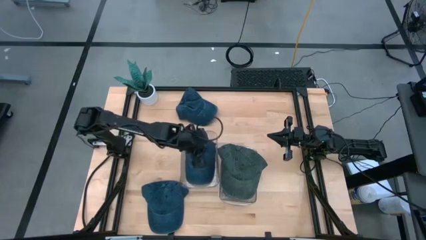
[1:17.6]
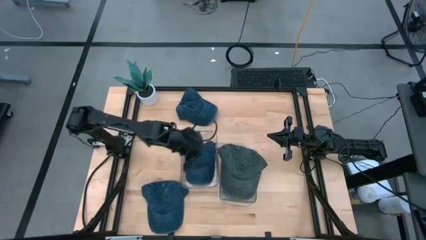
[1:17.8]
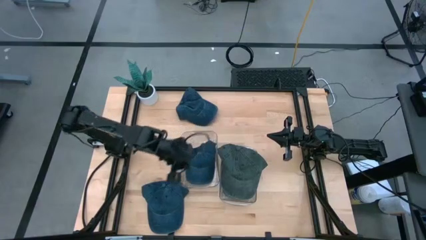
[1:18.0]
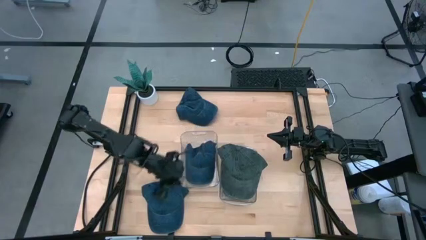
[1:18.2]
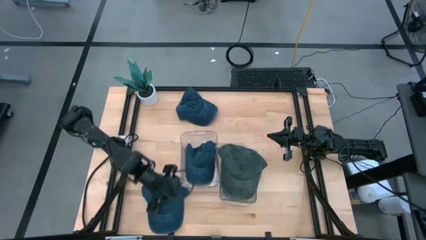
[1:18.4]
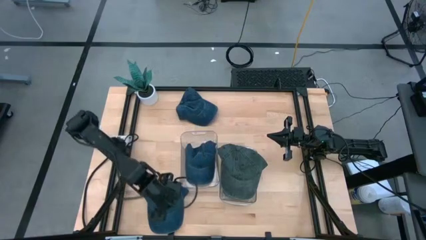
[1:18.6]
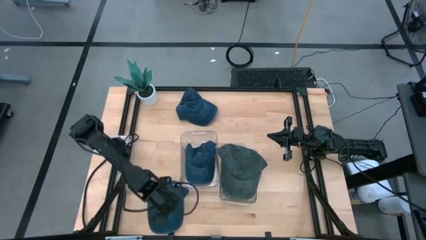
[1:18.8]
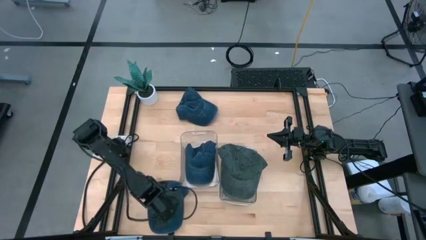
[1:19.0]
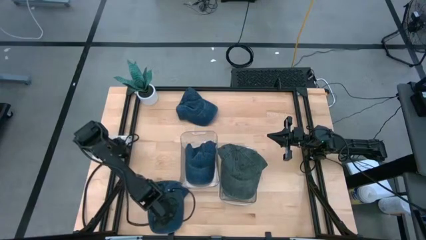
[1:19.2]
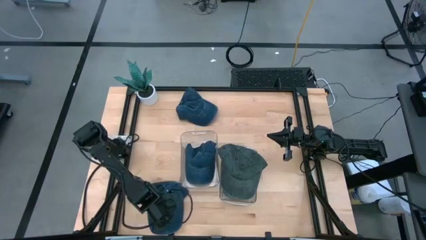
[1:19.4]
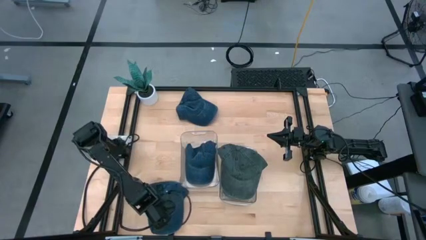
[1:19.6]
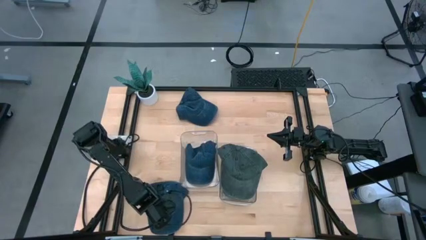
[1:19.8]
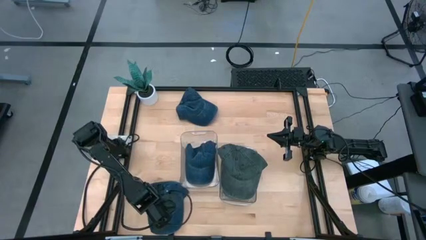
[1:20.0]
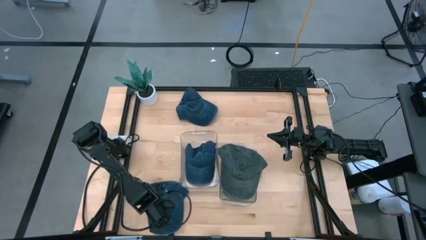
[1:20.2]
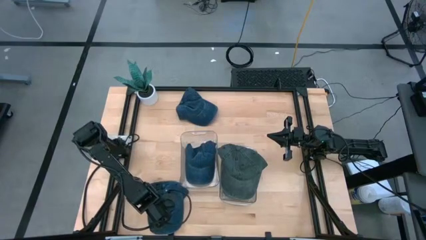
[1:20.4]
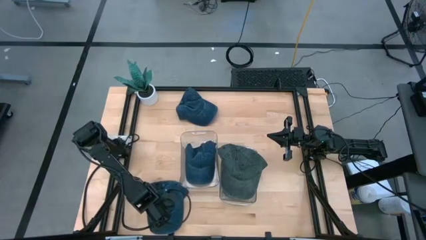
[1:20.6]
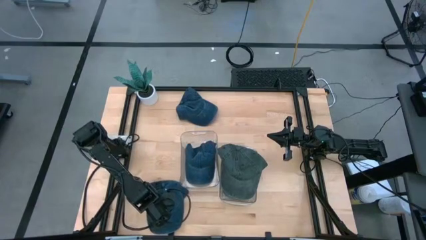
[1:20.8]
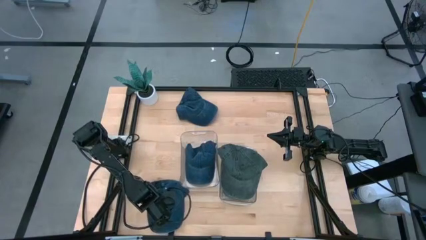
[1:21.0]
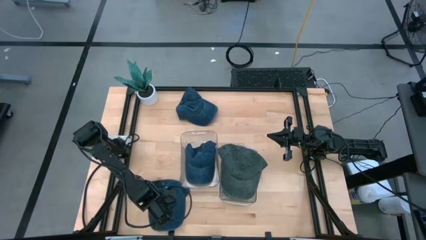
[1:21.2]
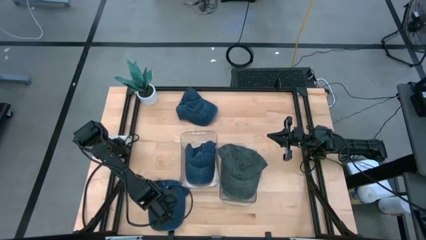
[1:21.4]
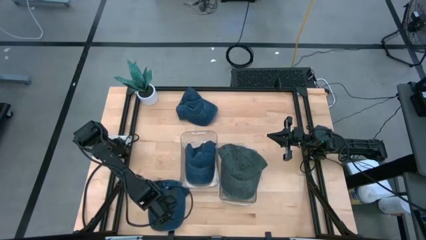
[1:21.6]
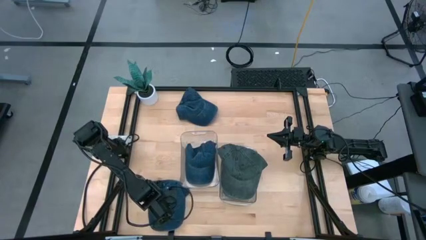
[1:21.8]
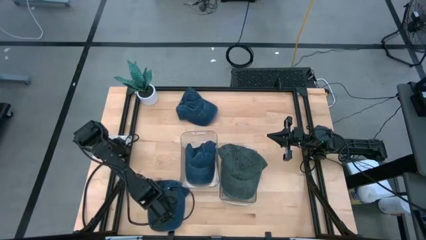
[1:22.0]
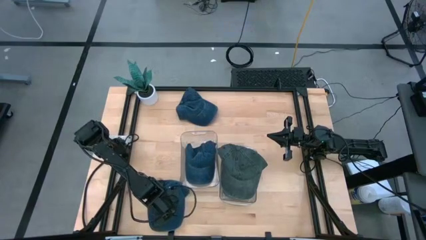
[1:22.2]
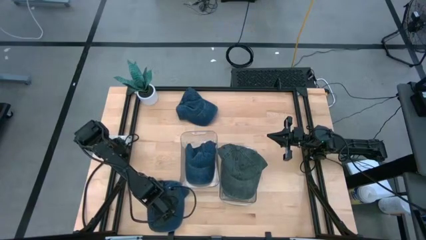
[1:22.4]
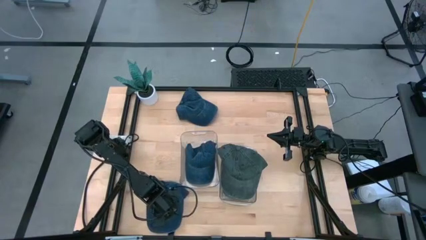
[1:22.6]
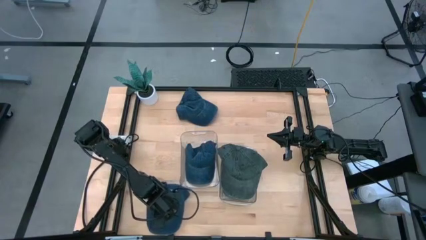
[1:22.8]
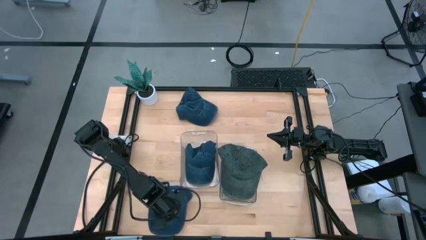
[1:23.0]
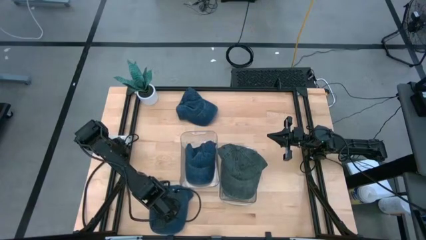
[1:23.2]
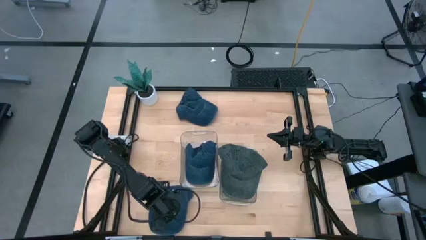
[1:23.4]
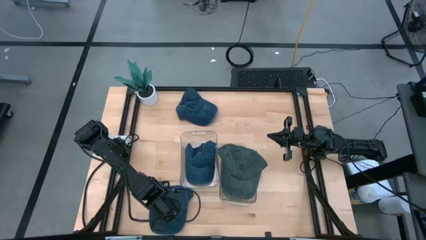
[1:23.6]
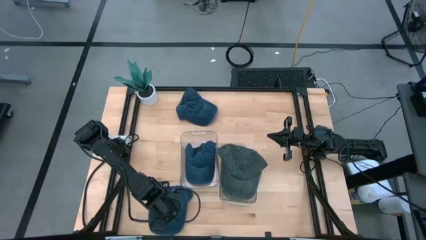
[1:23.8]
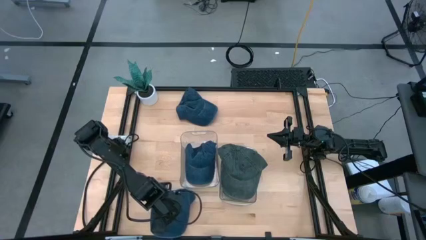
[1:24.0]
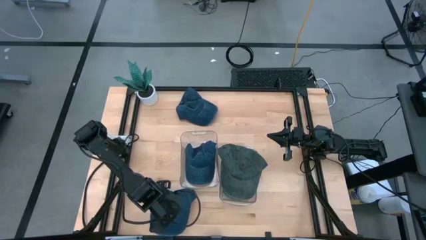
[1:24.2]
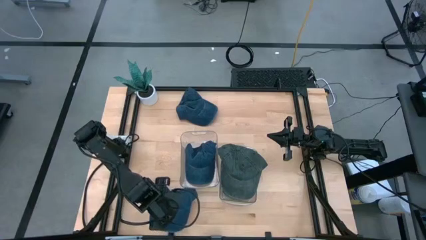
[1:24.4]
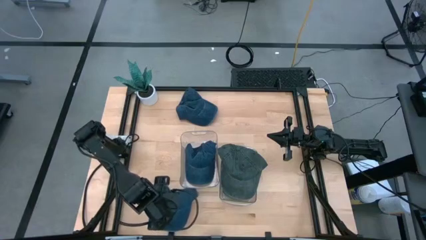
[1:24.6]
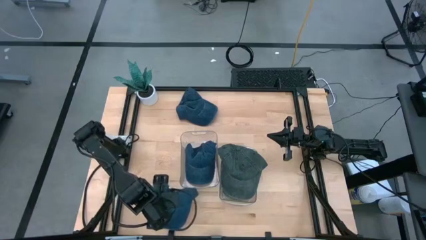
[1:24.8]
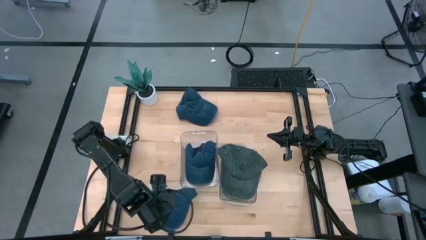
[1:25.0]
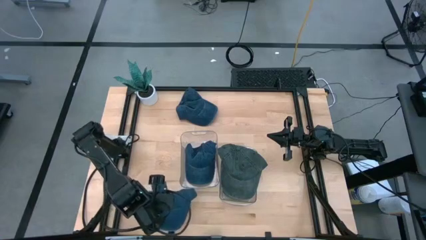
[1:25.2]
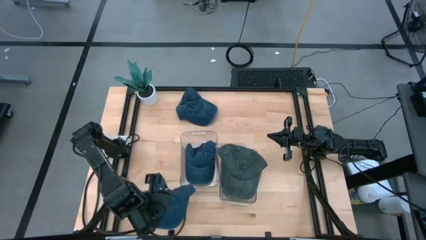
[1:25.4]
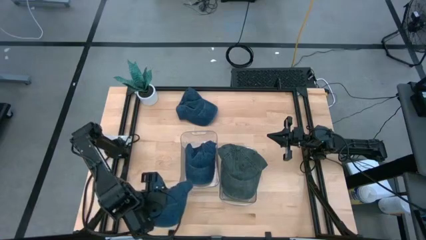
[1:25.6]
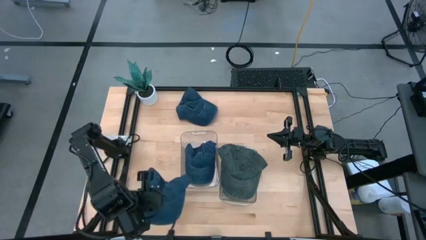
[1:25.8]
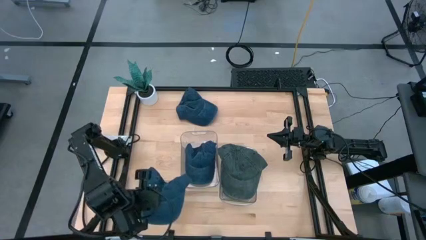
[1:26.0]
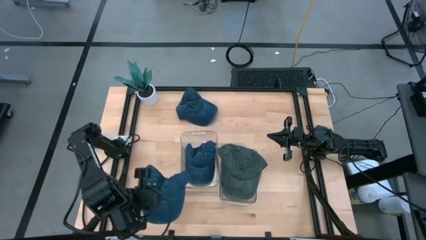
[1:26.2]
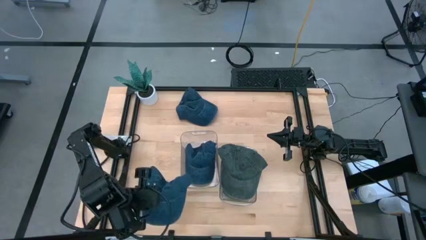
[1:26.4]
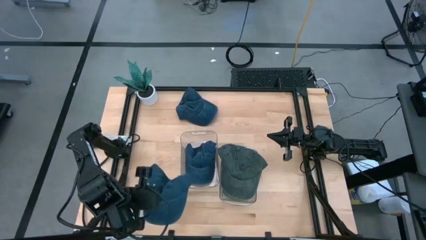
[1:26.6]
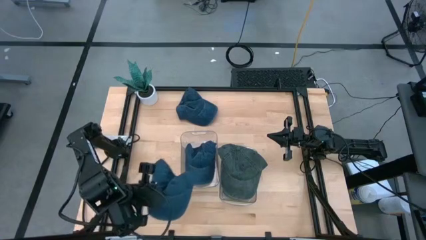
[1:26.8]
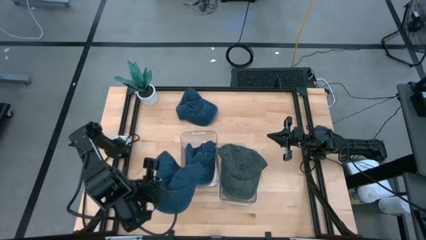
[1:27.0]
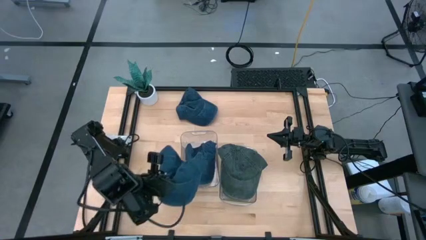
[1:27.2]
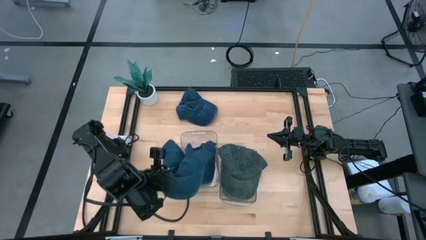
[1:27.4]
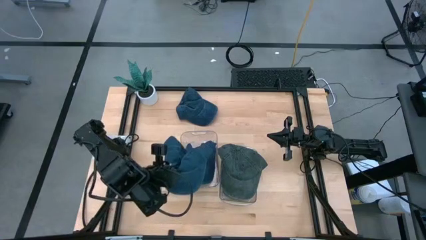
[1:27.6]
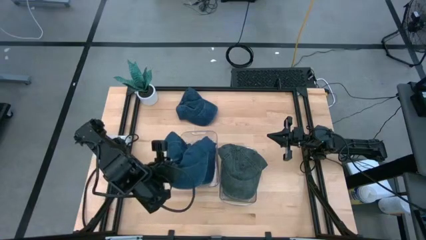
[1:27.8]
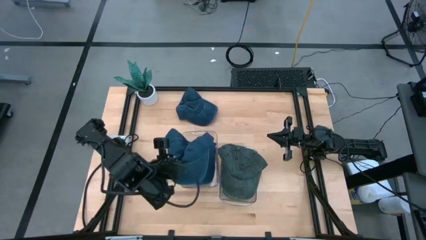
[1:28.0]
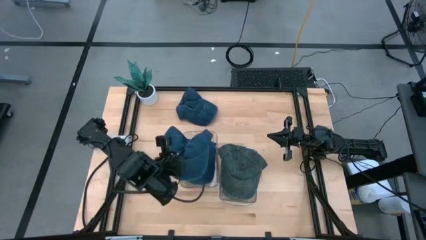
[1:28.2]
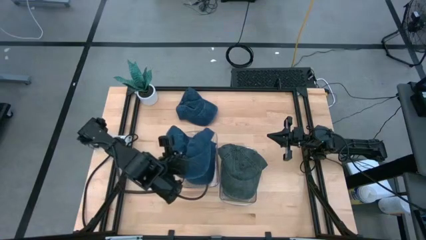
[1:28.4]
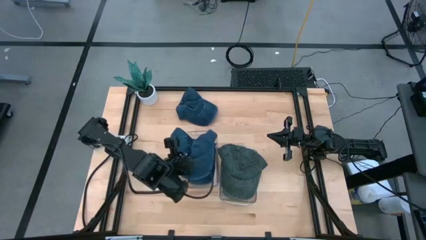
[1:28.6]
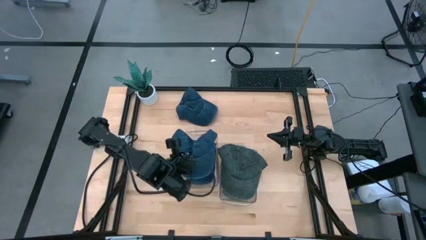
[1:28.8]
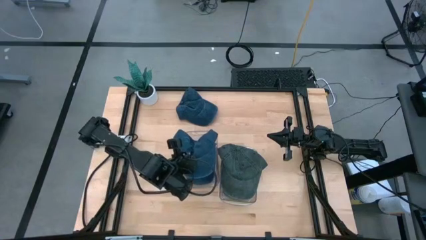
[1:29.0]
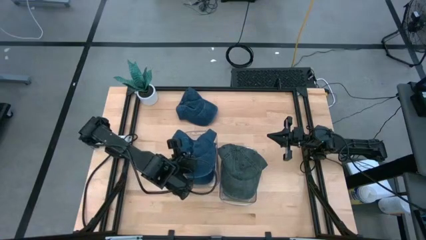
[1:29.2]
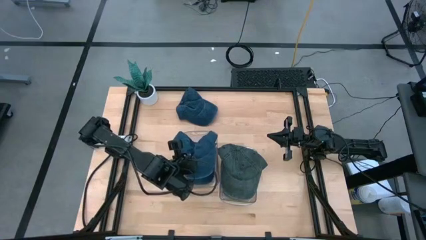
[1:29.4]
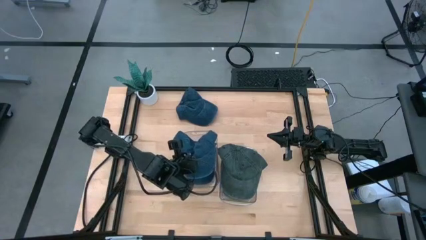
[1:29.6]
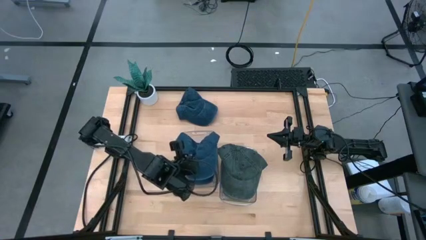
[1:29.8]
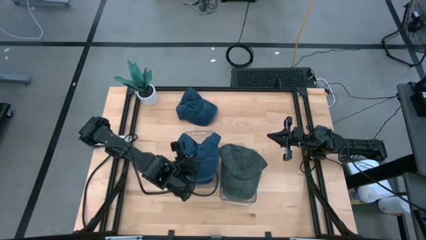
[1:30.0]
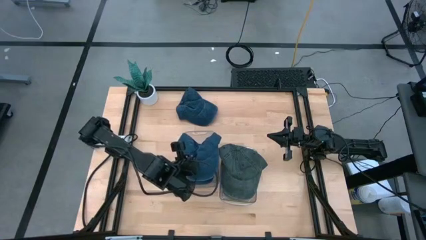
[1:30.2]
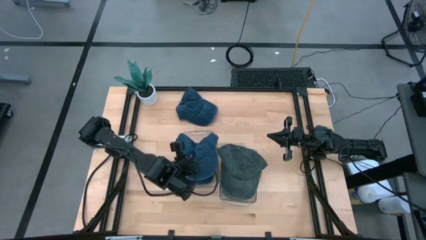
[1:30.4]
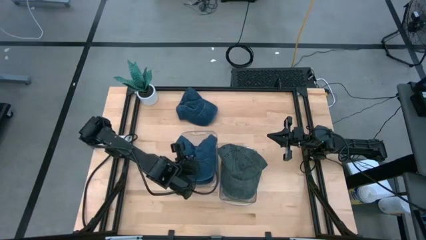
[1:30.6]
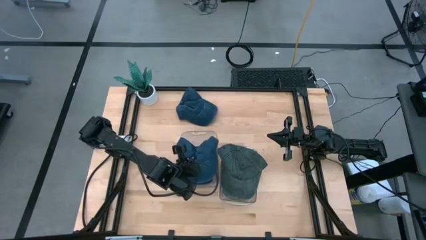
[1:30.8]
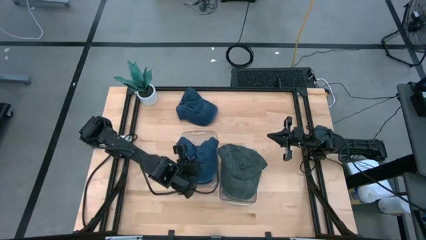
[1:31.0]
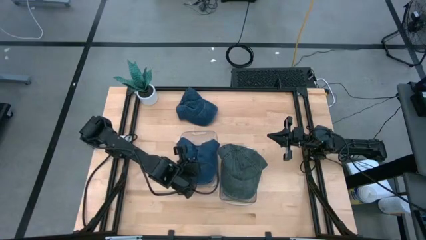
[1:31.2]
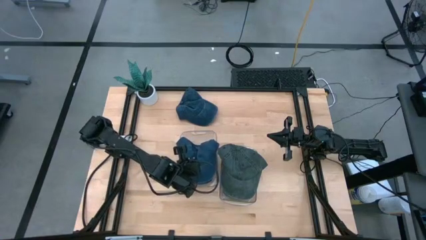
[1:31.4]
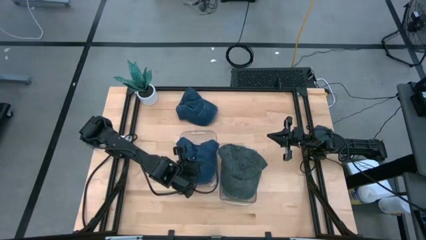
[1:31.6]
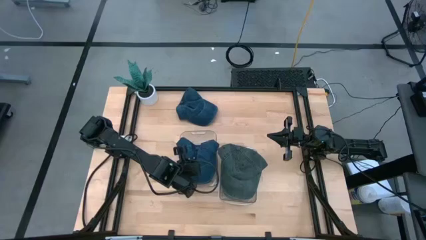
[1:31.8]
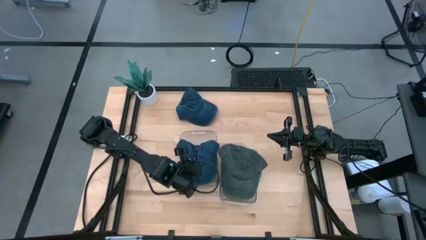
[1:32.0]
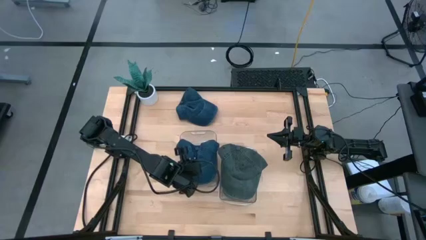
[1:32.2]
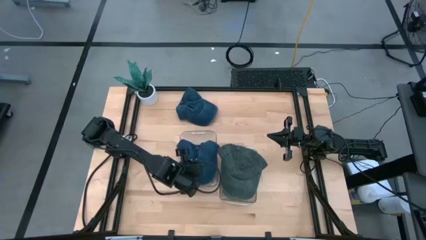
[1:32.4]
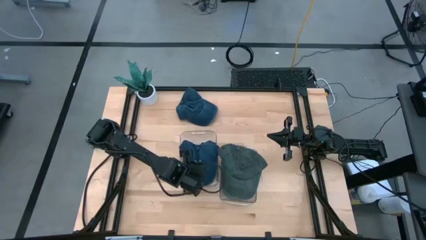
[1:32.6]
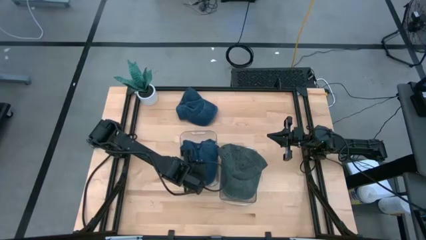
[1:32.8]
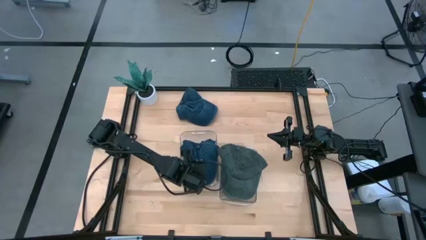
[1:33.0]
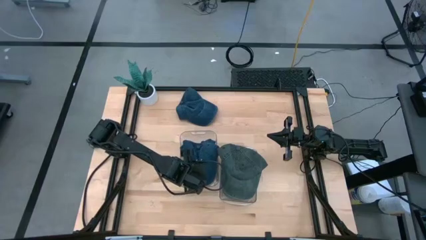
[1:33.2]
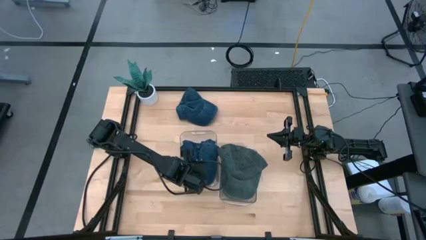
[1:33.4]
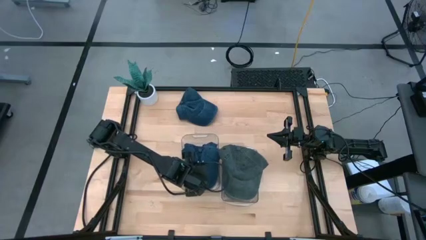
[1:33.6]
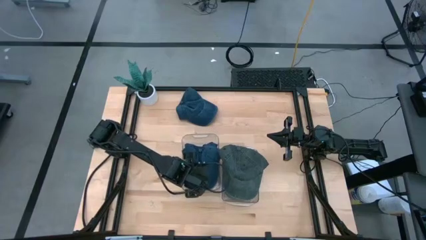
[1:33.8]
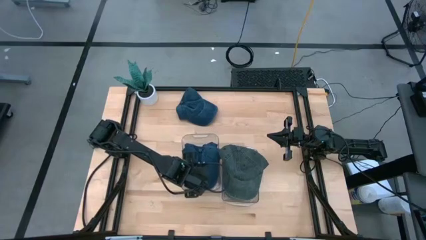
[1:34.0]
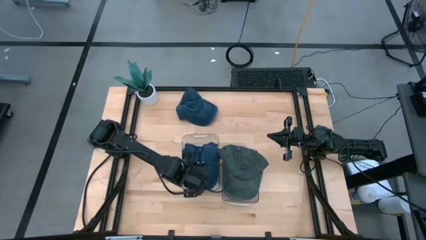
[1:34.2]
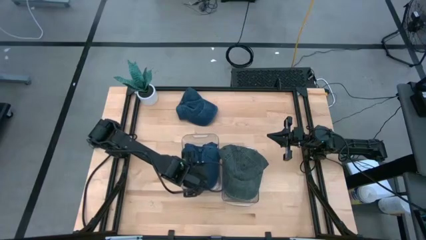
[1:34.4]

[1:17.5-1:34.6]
Task: Pick & Place hat
Put the bottom blue cap into the left transparent bin

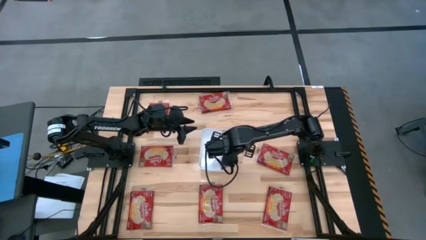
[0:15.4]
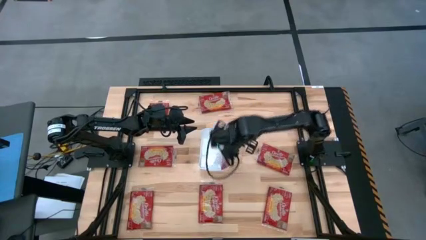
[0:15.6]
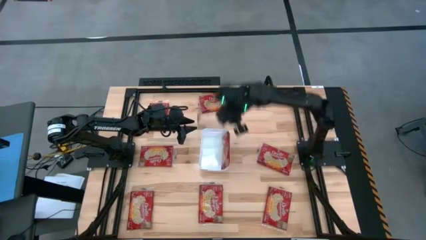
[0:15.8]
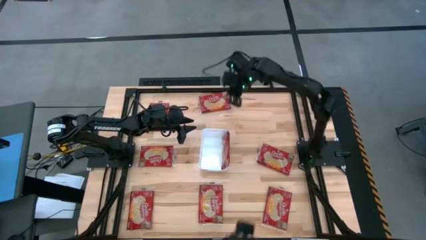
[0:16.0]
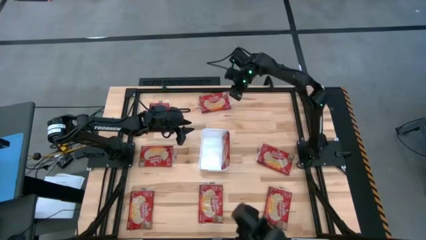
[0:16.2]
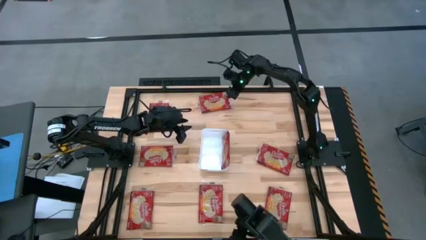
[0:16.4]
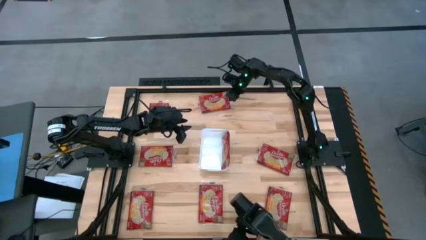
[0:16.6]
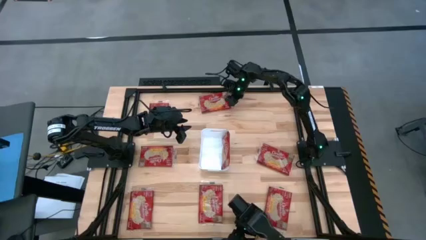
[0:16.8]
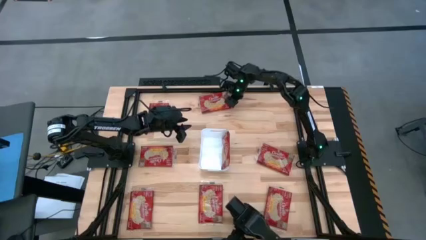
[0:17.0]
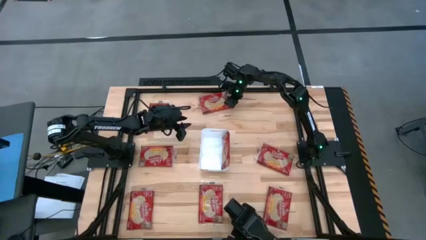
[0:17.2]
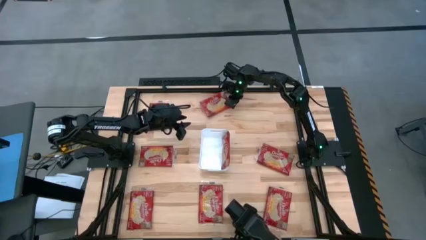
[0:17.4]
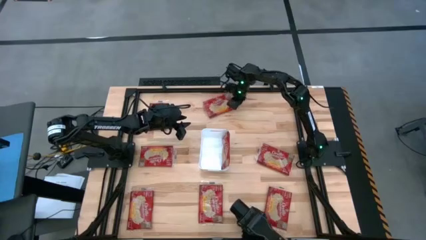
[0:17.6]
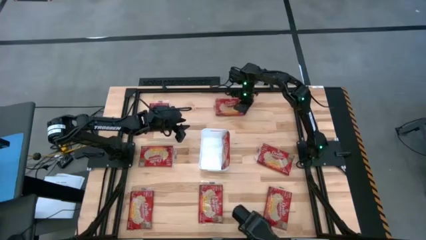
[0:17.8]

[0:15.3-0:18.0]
Task: Sort popcorn bags into baskets
Put the red popcorn bag into the white bin
